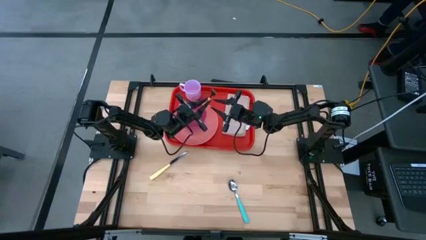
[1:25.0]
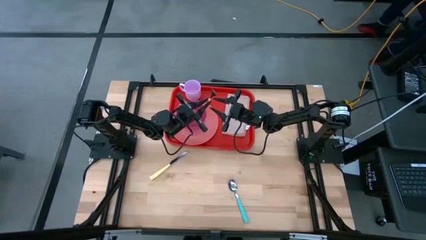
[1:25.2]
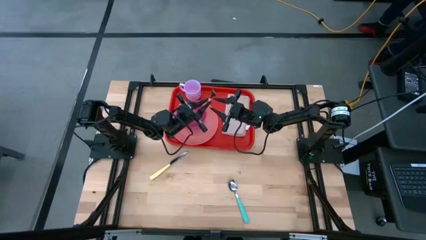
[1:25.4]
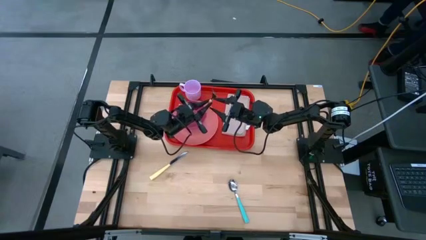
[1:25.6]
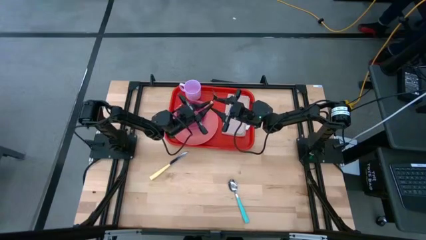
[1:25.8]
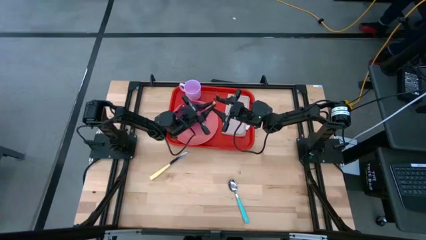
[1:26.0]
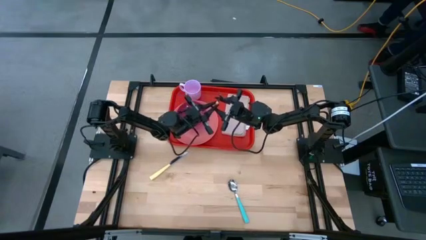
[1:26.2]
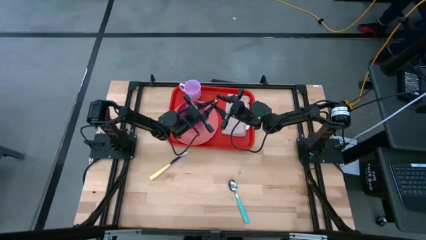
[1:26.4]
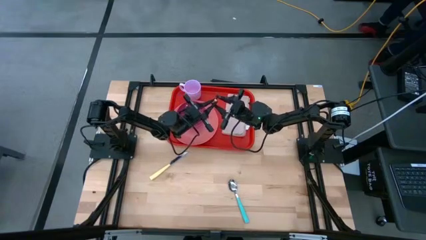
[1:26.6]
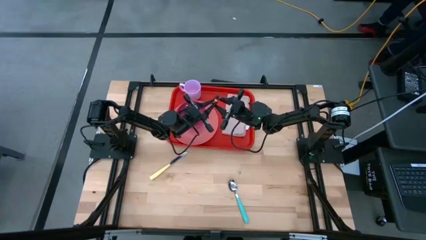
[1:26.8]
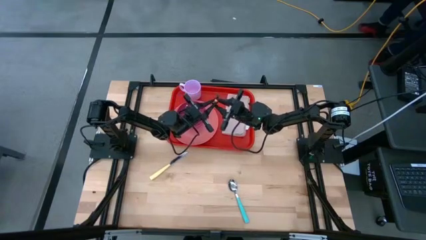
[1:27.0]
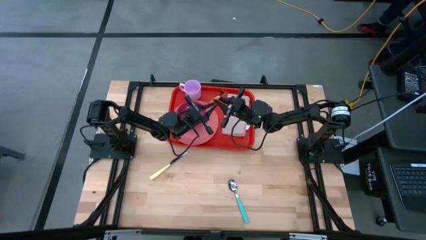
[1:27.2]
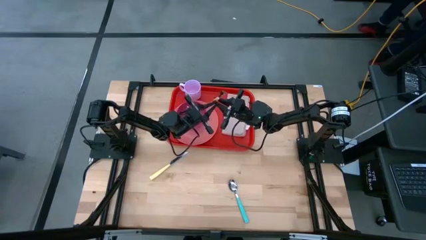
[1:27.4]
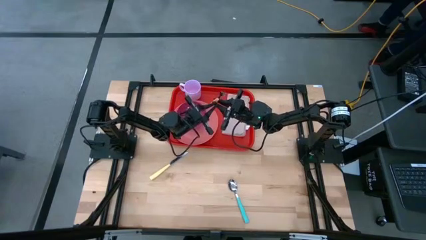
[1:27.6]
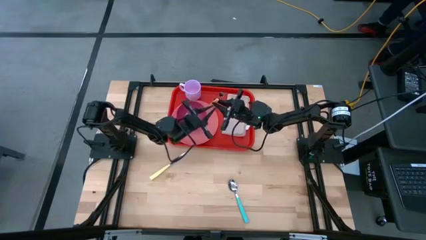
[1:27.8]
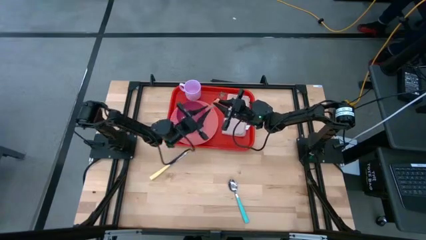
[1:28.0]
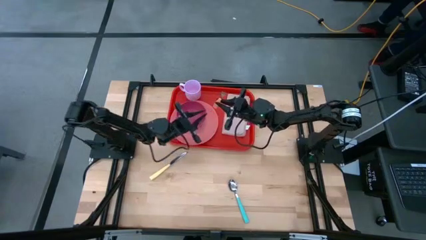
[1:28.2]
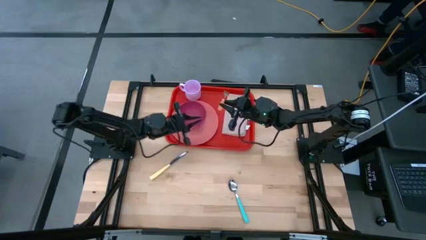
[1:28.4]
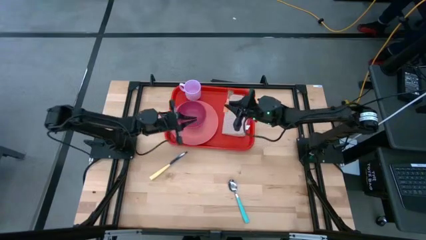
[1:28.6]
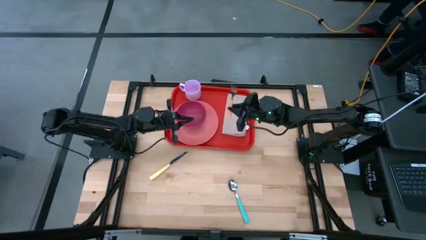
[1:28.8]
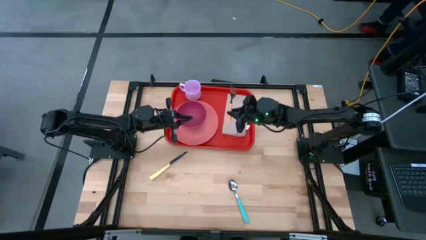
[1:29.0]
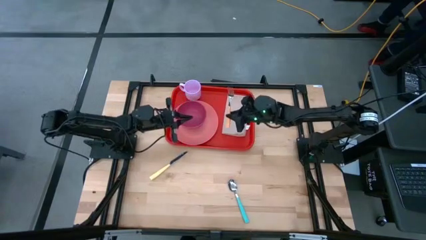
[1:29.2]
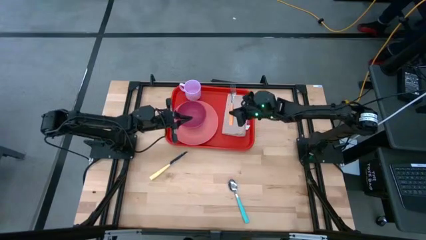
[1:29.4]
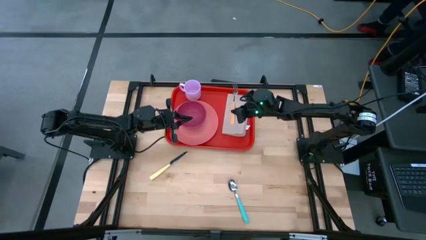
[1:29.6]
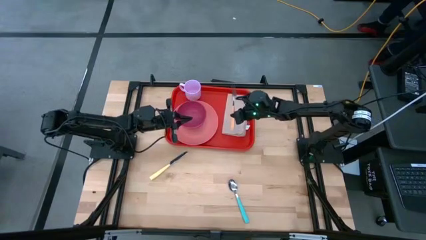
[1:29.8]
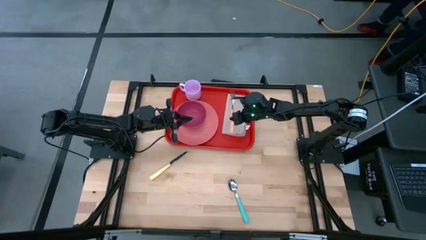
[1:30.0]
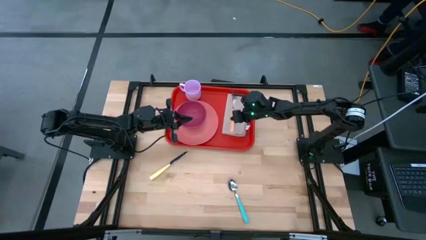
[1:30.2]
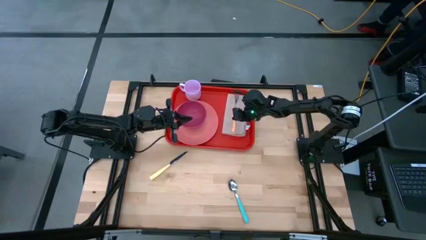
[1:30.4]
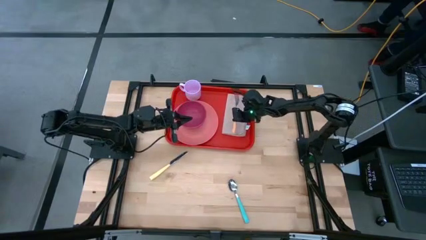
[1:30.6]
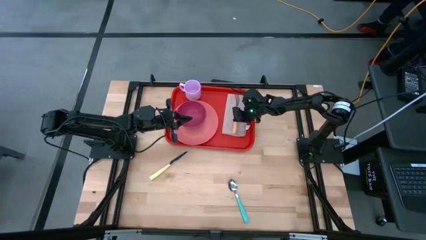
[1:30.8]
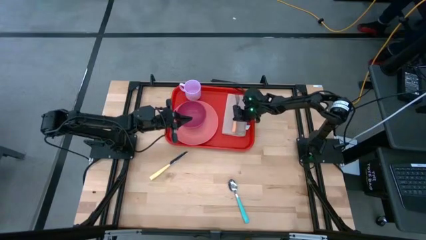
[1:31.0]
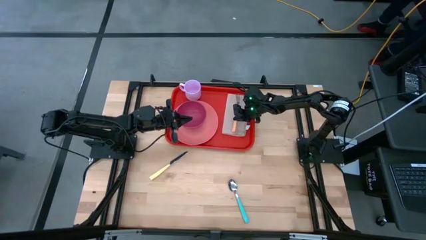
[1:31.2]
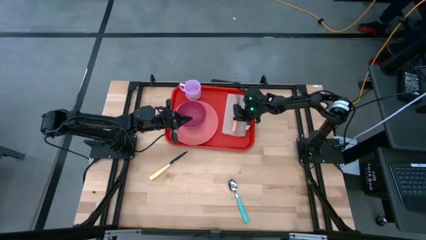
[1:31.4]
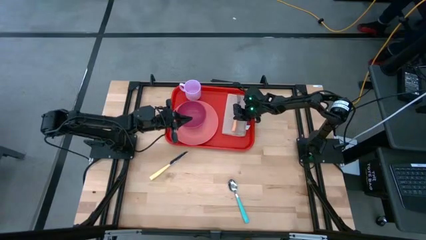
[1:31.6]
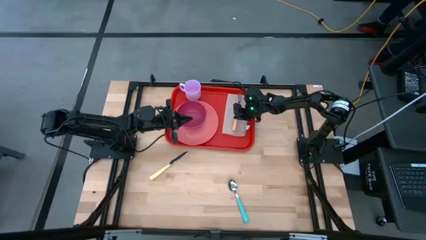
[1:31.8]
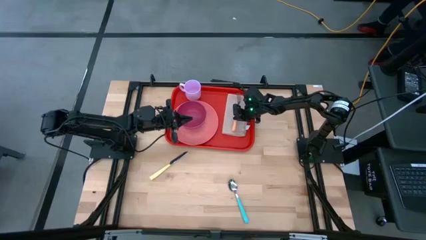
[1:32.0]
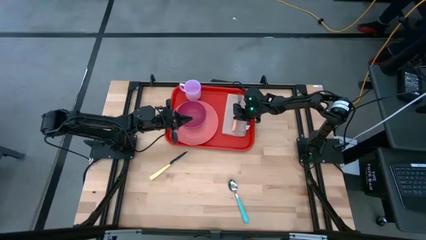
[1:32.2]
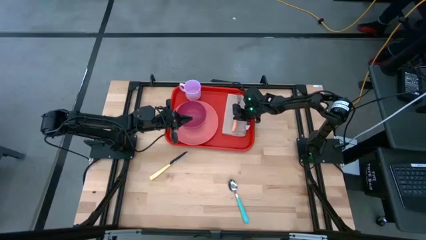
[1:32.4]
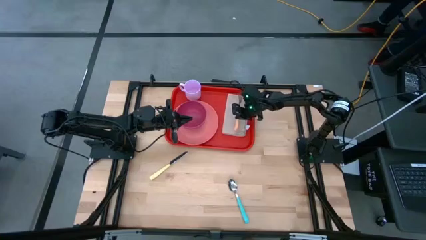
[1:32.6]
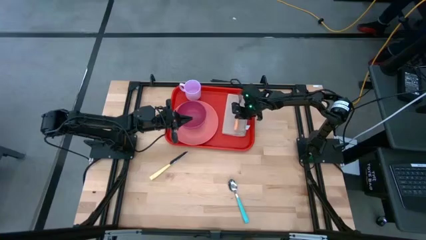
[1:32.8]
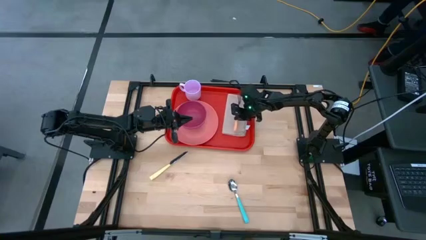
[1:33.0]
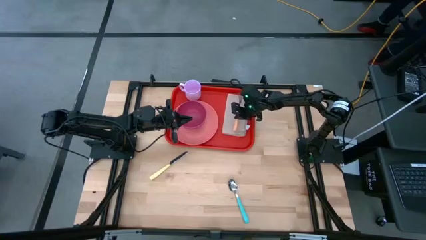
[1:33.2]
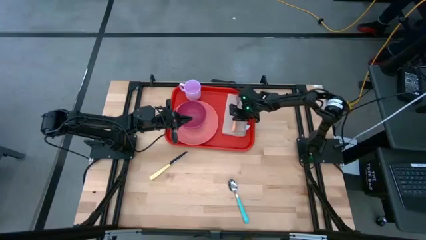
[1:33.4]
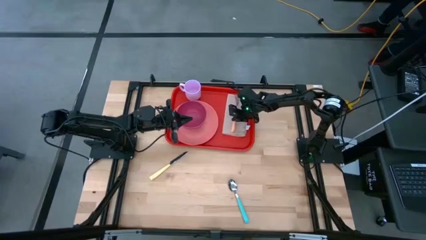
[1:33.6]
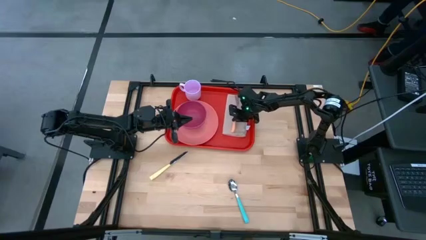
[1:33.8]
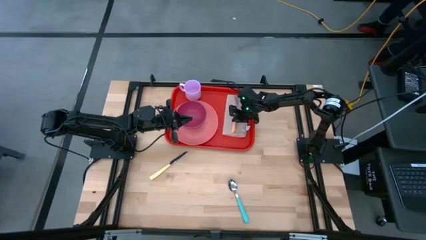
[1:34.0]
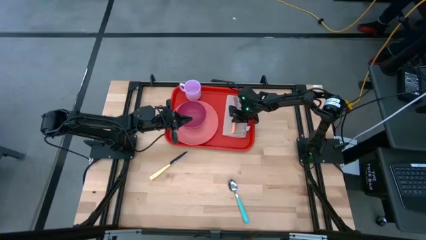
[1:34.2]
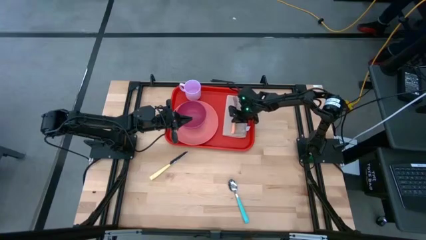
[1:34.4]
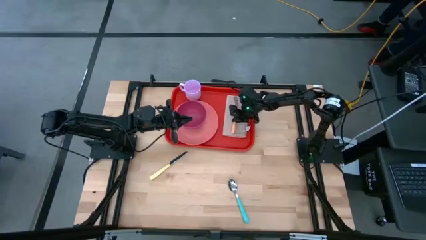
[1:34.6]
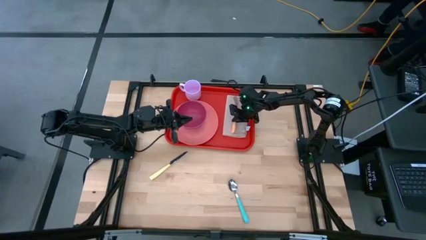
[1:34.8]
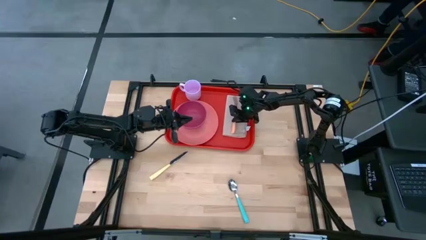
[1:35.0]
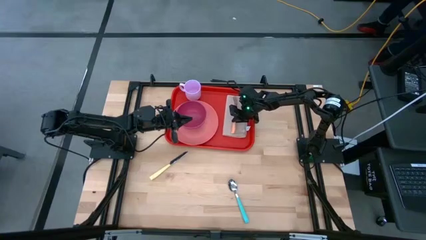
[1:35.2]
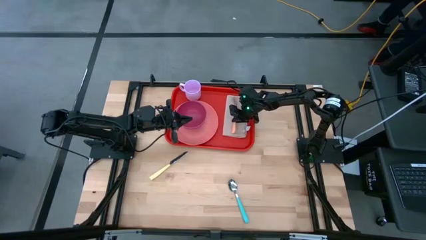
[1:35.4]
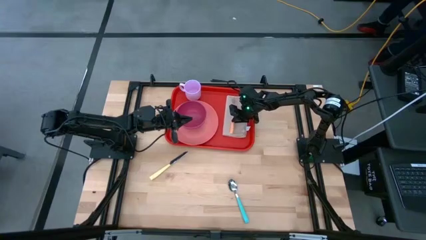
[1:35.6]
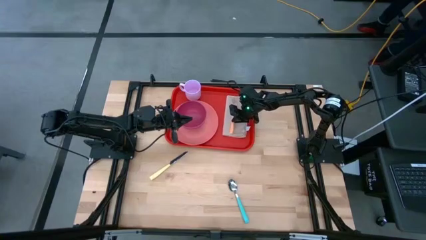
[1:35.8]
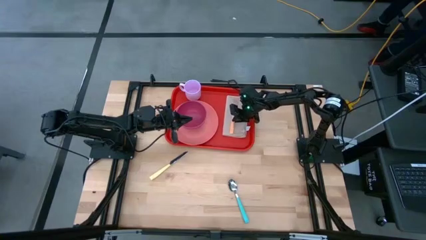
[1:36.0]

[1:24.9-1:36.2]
Task: Set up tray
Put the orange fork on the light brown napkin

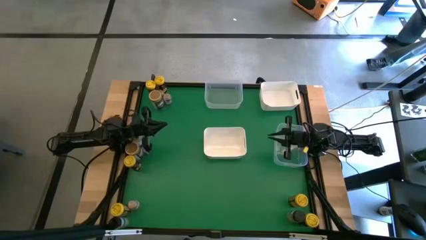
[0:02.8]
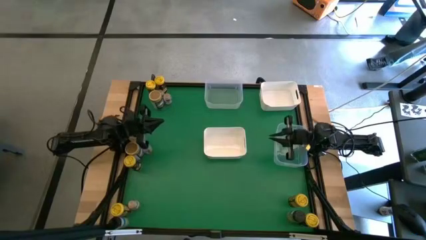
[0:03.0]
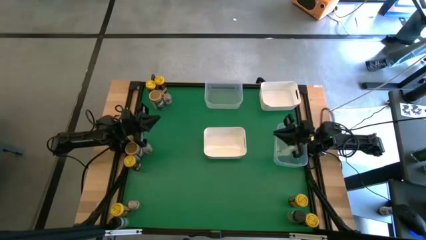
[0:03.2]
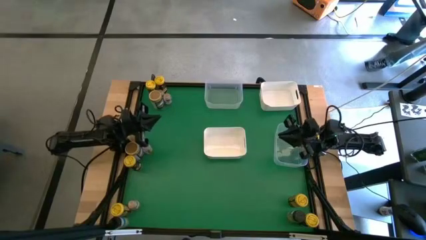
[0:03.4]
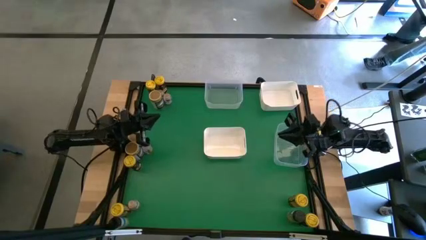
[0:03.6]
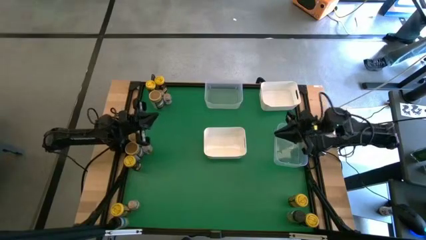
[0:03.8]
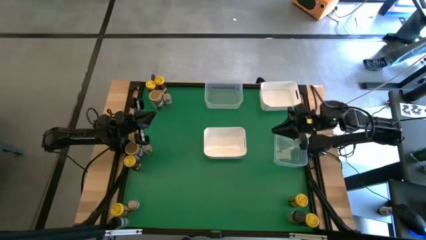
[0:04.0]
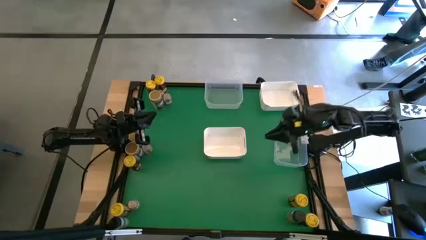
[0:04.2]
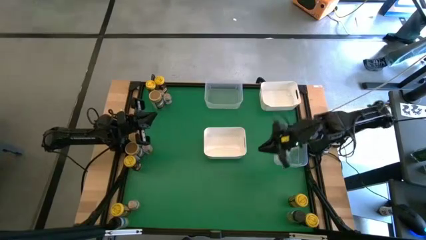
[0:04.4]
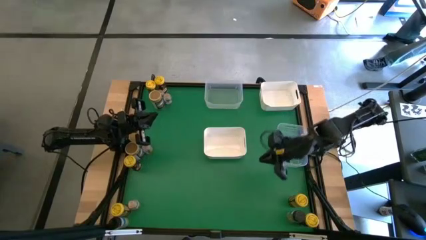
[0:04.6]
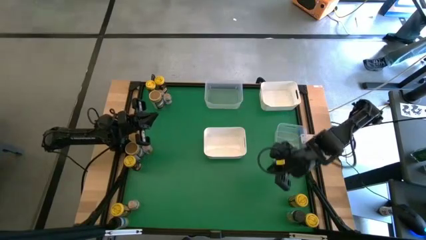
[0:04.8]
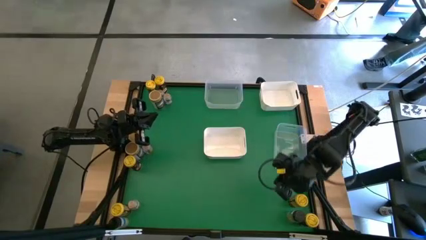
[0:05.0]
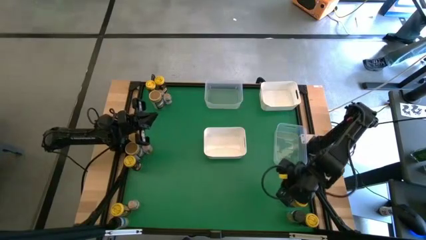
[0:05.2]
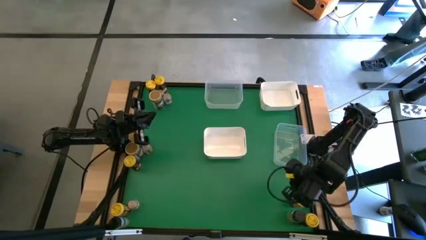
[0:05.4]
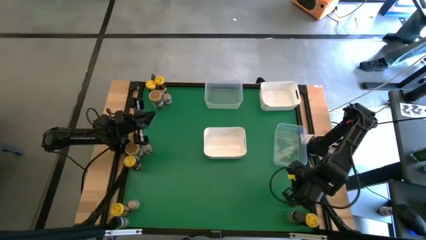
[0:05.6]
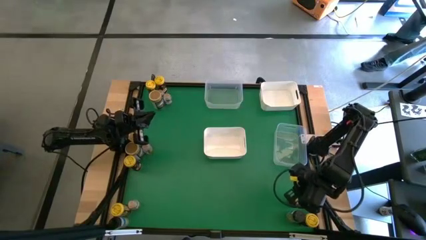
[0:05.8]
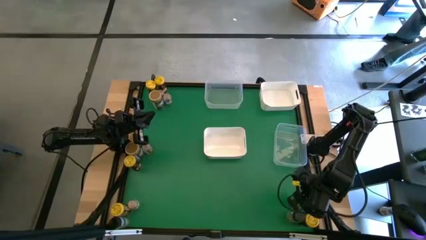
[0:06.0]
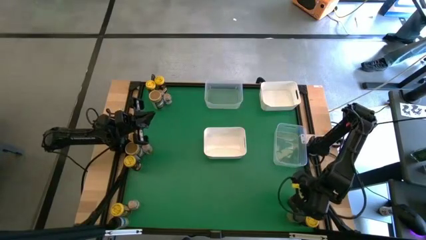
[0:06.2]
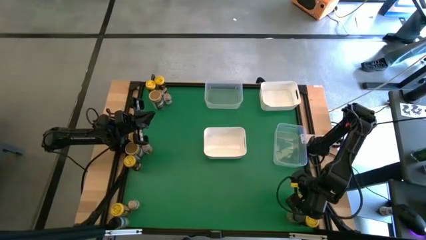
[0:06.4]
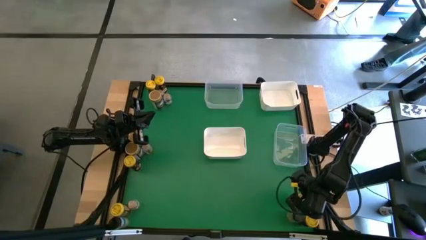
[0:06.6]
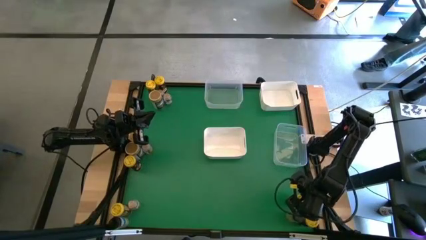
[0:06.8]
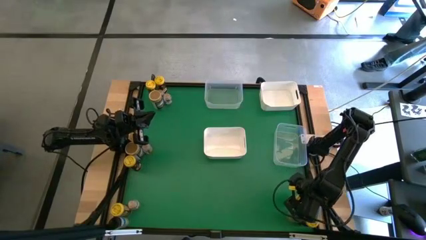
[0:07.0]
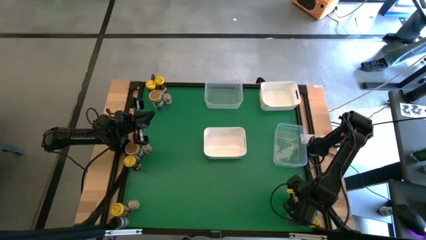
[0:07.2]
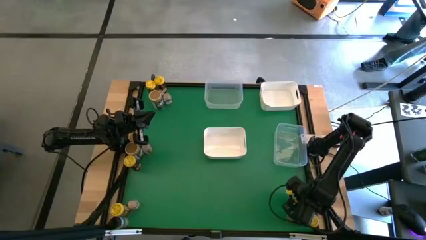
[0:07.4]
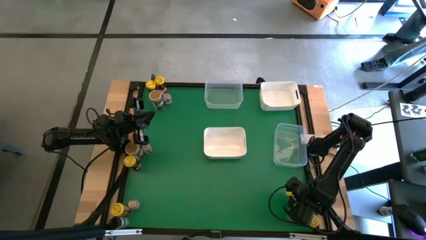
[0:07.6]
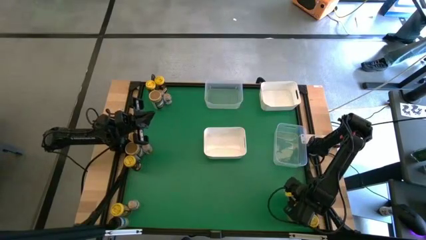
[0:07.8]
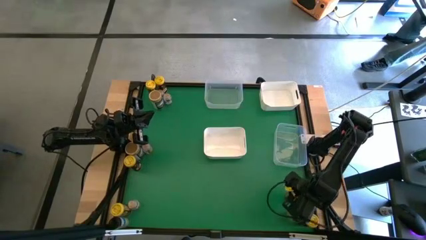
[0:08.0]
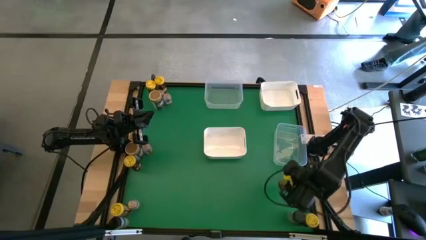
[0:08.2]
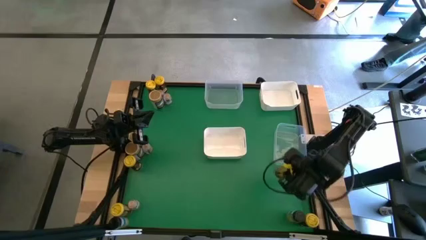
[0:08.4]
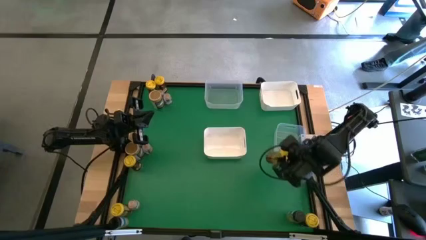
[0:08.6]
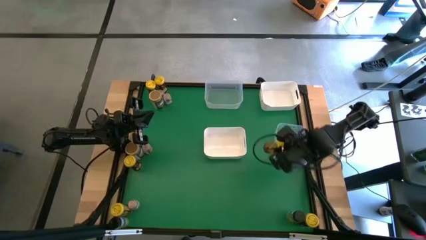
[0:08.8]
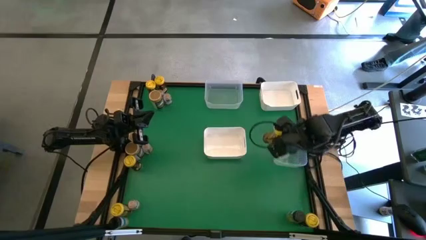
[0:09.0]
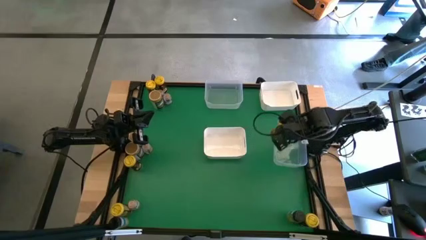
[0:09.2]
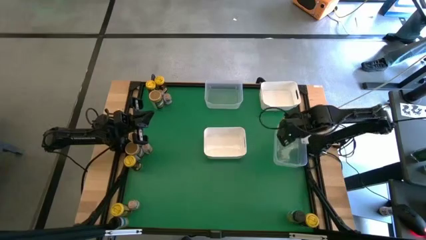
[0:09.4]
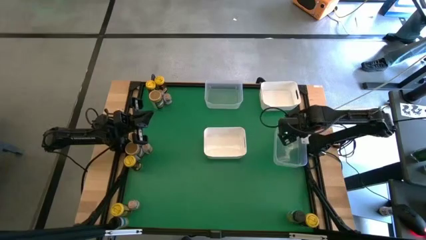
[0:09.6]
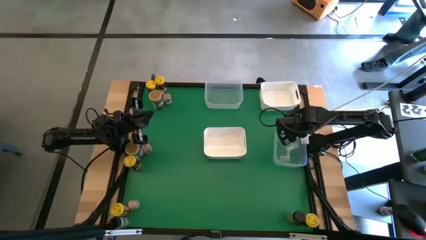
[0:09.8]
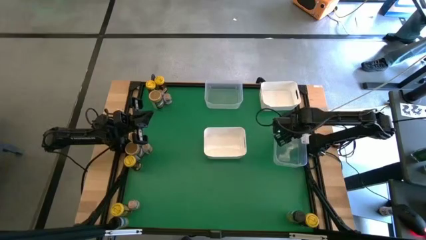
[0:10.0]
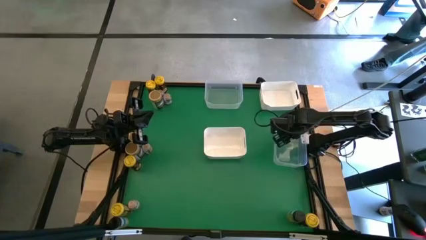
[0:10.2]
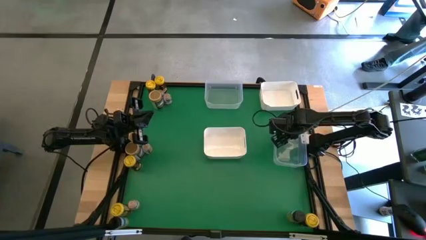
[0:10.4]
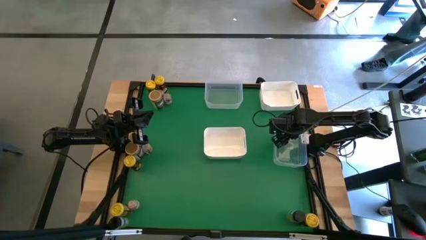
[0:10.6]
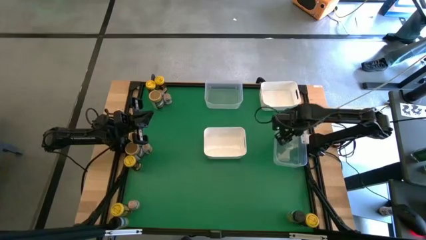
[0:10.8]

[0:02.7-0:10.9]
Task: Sort spices by type
Put the yellow seasoning can into the bottom transparent bin
